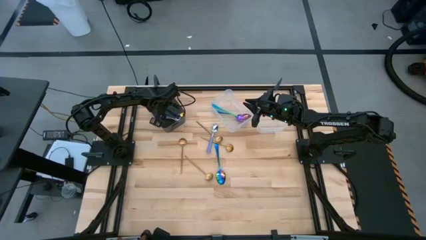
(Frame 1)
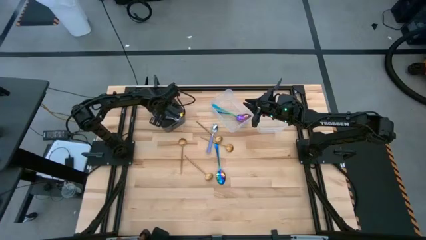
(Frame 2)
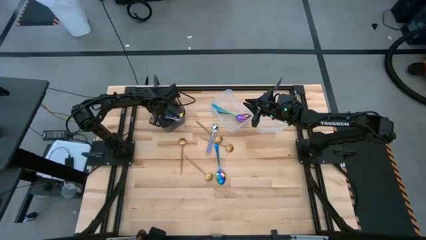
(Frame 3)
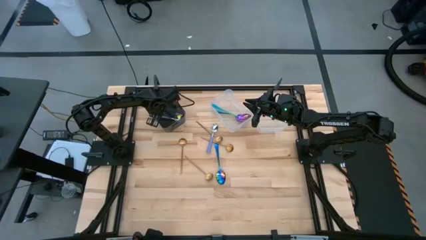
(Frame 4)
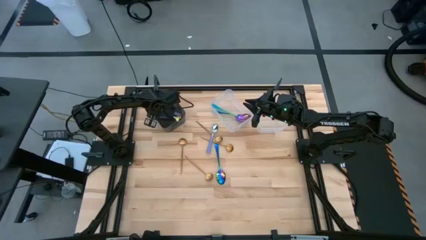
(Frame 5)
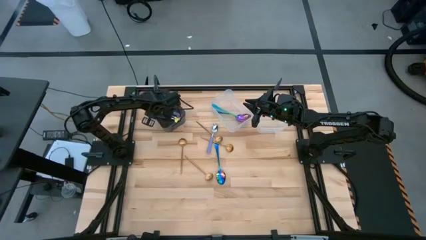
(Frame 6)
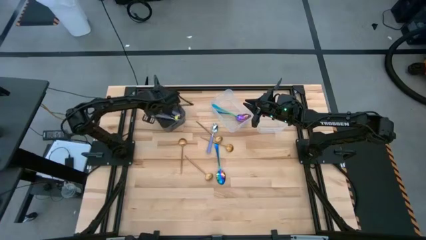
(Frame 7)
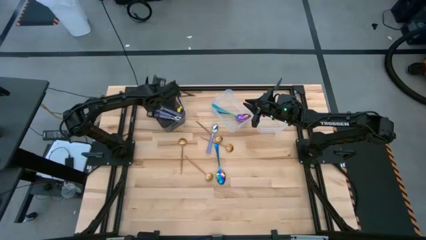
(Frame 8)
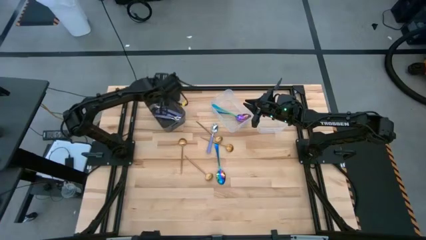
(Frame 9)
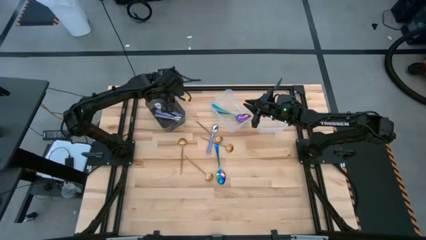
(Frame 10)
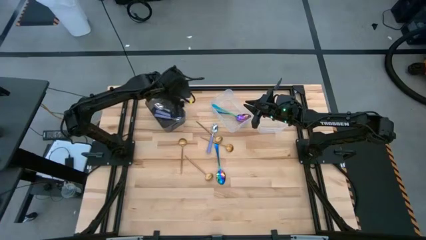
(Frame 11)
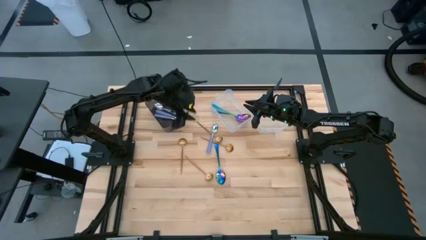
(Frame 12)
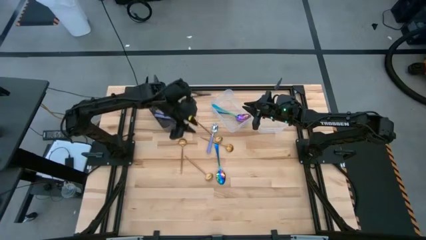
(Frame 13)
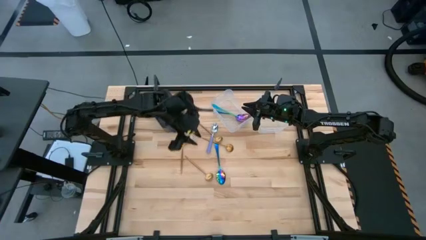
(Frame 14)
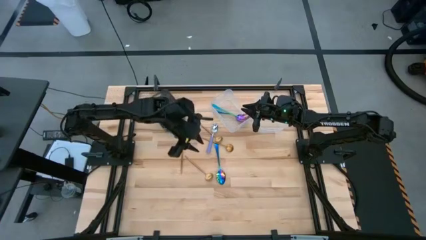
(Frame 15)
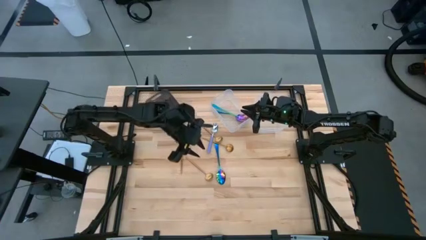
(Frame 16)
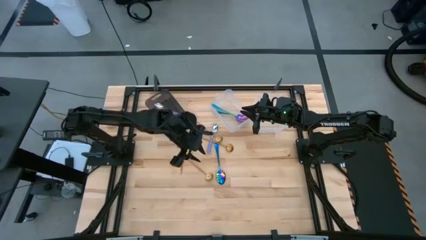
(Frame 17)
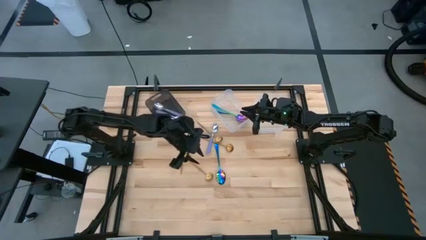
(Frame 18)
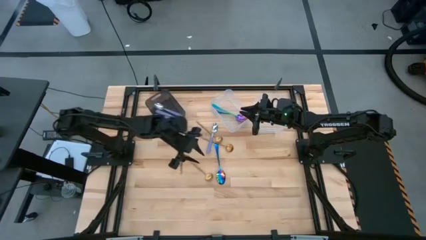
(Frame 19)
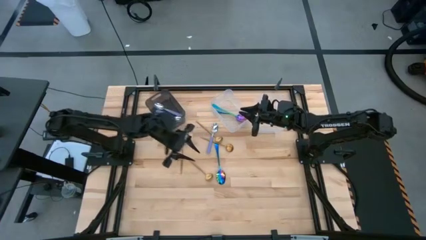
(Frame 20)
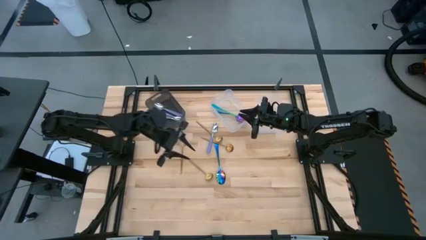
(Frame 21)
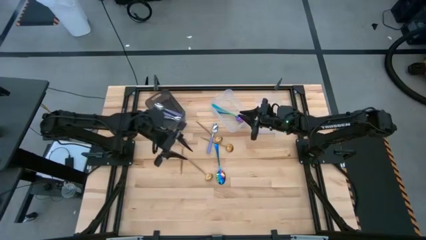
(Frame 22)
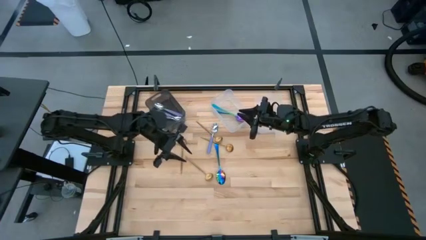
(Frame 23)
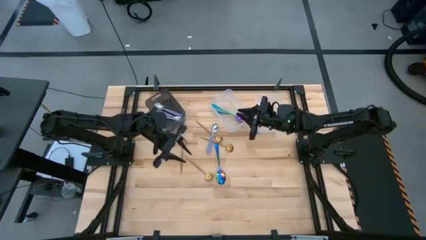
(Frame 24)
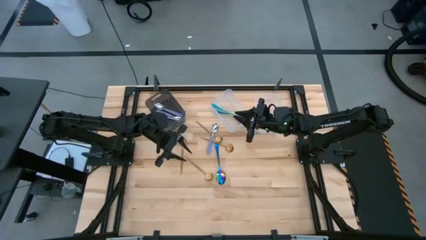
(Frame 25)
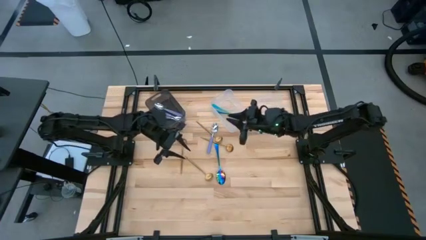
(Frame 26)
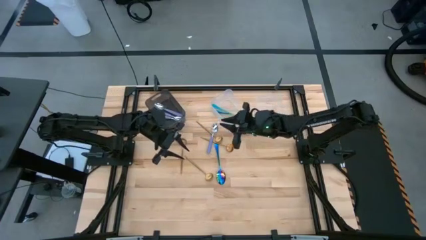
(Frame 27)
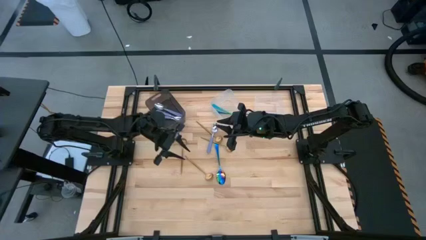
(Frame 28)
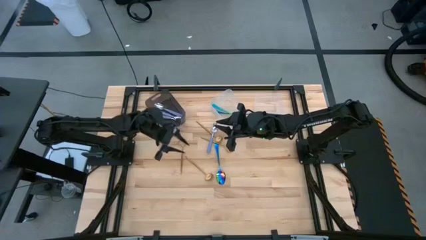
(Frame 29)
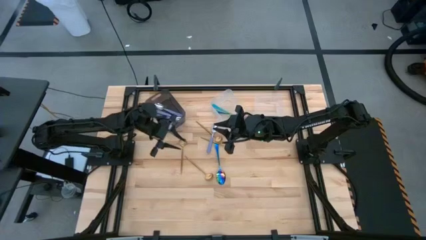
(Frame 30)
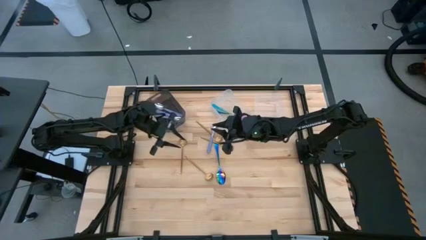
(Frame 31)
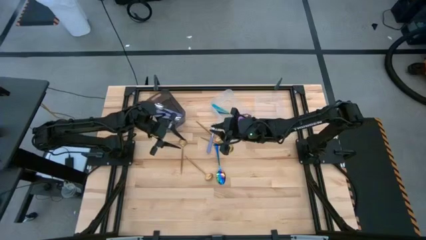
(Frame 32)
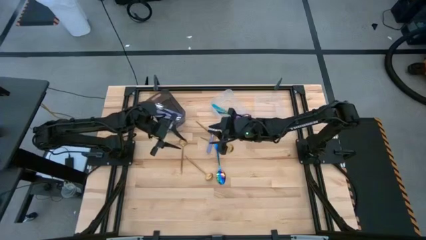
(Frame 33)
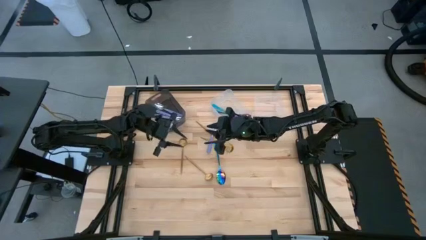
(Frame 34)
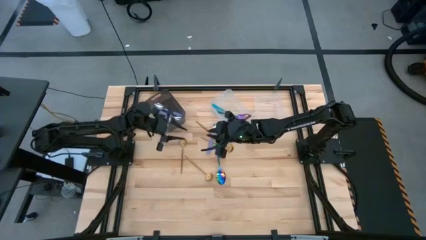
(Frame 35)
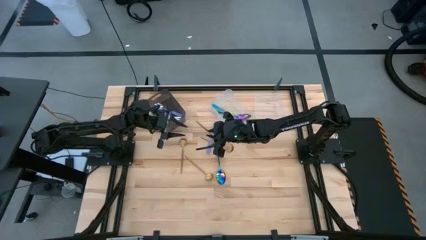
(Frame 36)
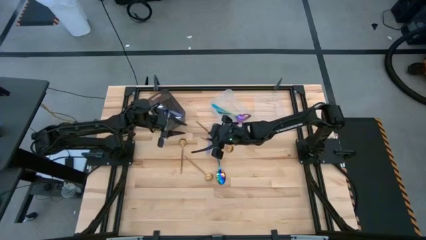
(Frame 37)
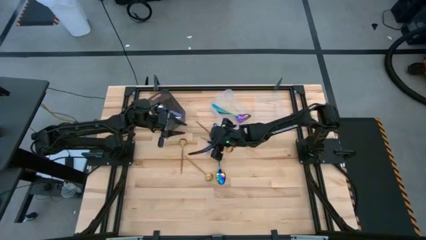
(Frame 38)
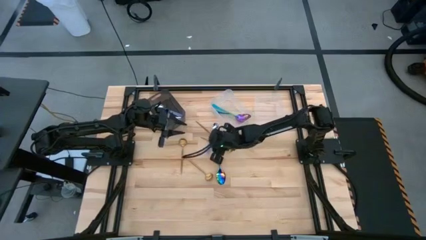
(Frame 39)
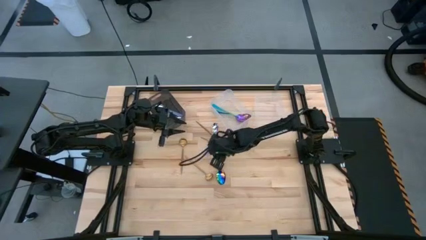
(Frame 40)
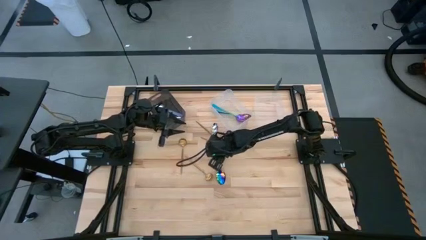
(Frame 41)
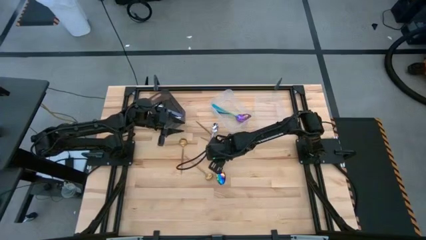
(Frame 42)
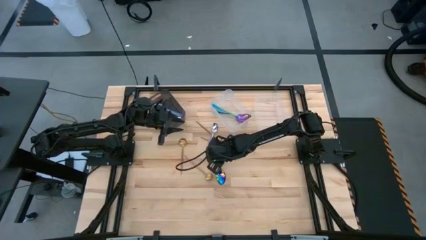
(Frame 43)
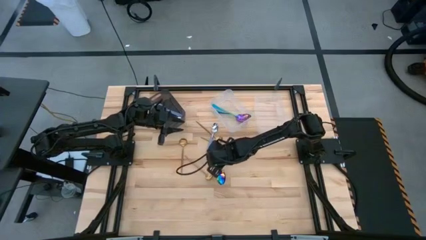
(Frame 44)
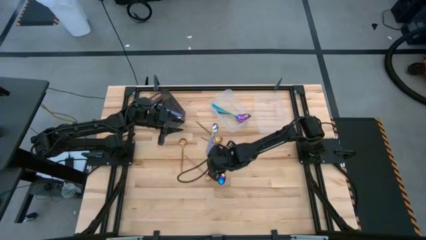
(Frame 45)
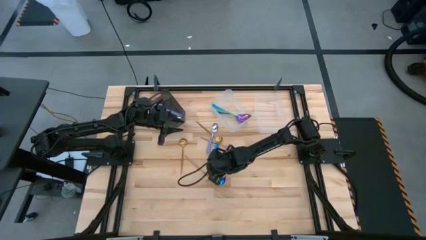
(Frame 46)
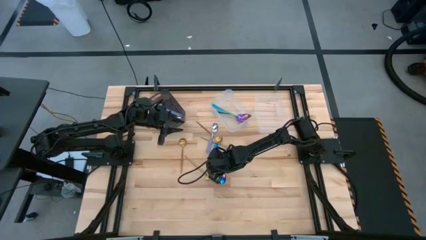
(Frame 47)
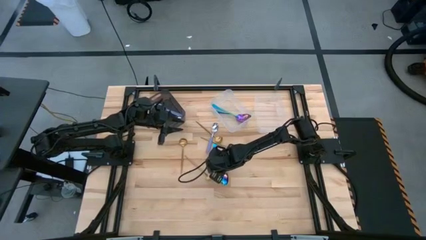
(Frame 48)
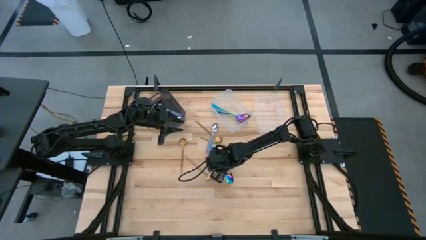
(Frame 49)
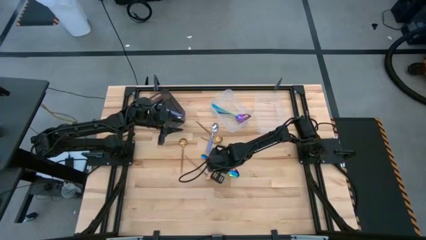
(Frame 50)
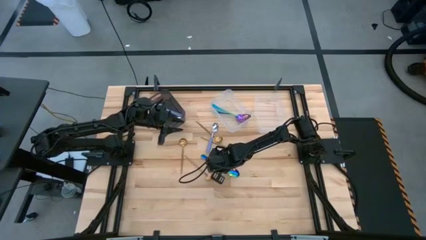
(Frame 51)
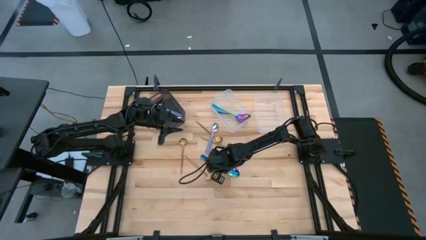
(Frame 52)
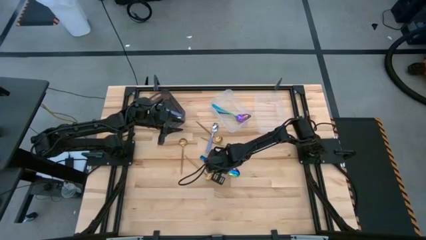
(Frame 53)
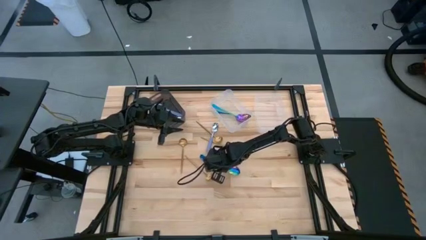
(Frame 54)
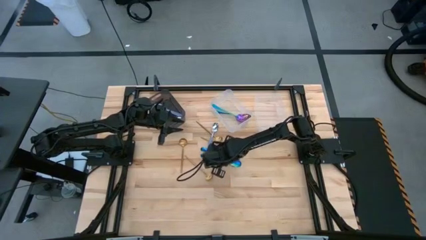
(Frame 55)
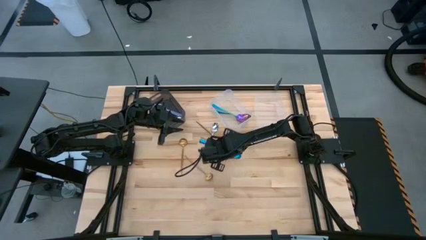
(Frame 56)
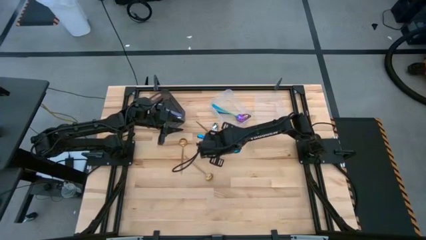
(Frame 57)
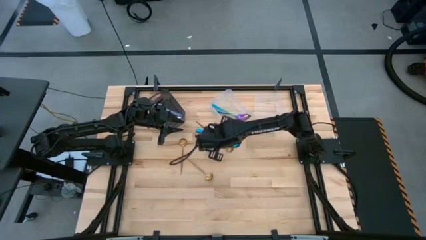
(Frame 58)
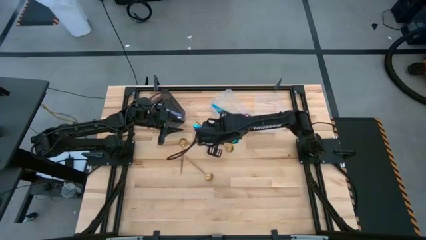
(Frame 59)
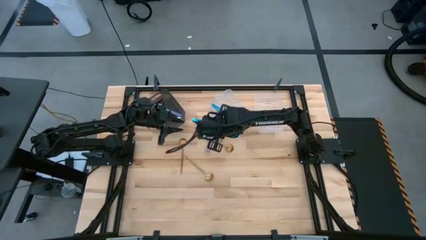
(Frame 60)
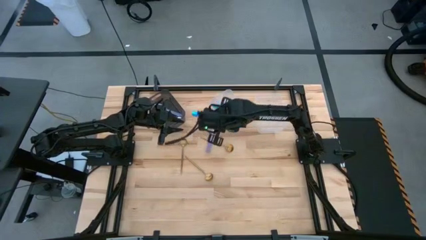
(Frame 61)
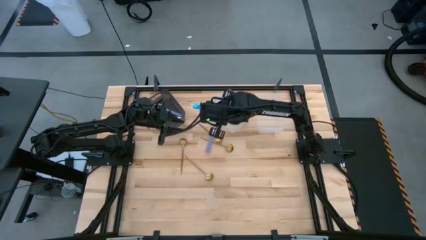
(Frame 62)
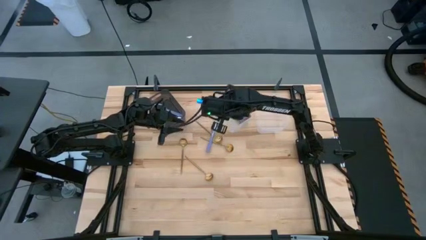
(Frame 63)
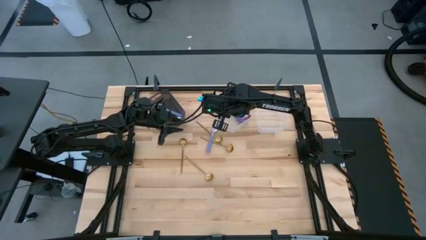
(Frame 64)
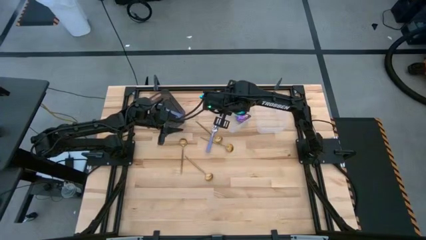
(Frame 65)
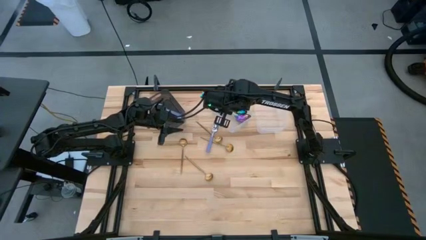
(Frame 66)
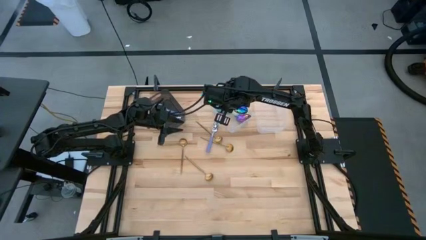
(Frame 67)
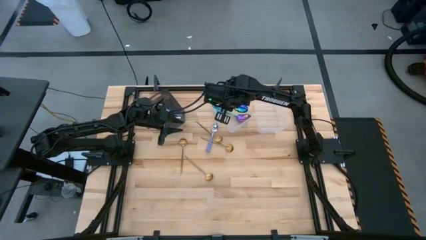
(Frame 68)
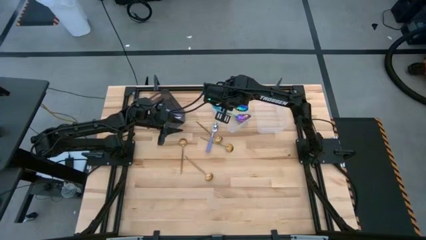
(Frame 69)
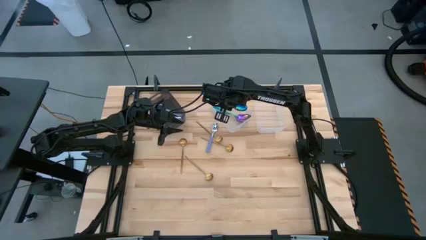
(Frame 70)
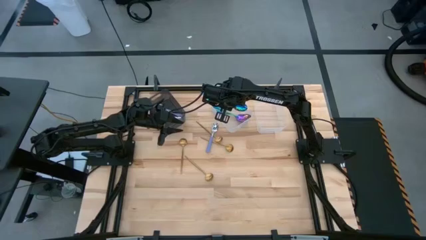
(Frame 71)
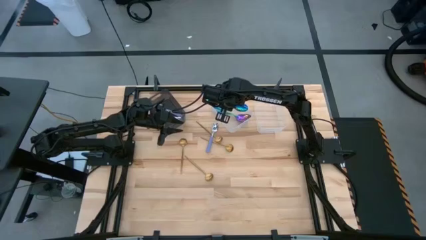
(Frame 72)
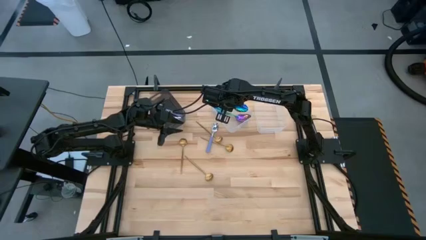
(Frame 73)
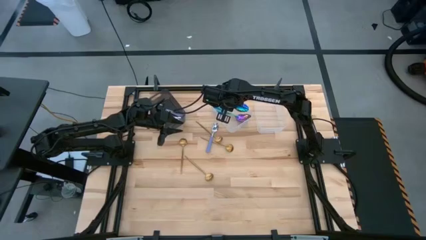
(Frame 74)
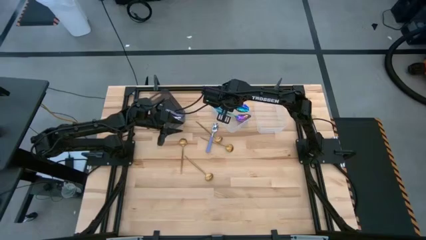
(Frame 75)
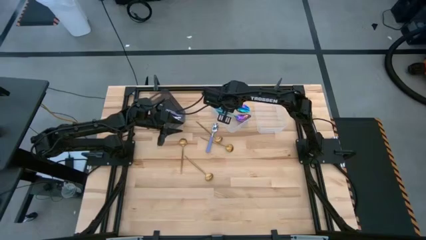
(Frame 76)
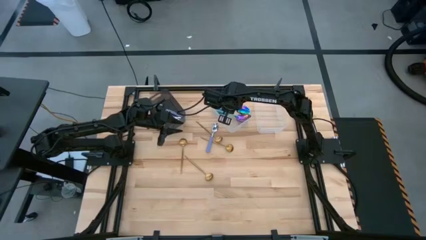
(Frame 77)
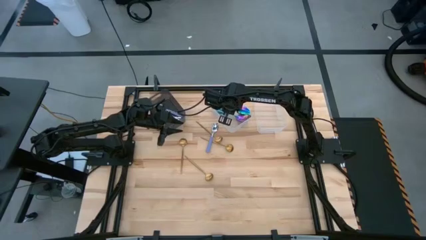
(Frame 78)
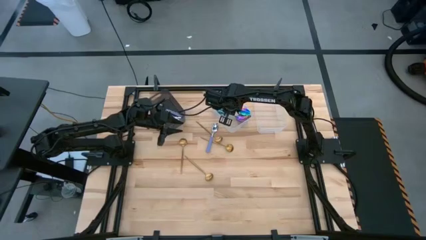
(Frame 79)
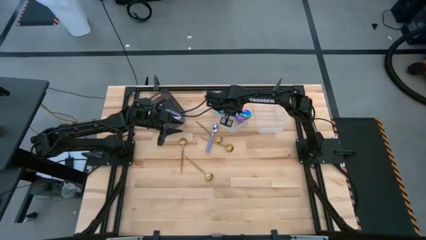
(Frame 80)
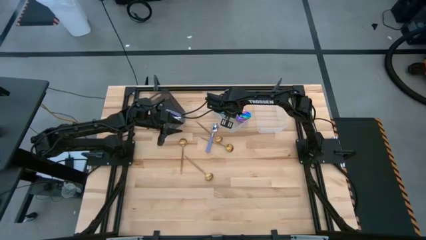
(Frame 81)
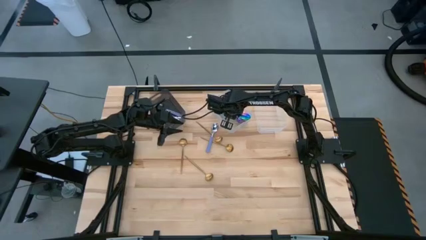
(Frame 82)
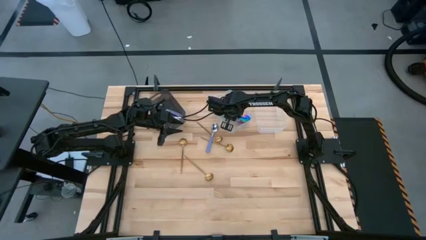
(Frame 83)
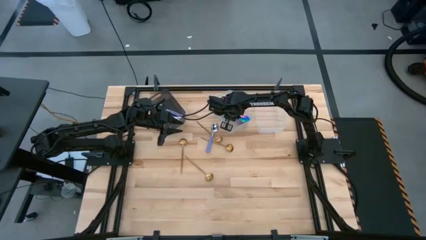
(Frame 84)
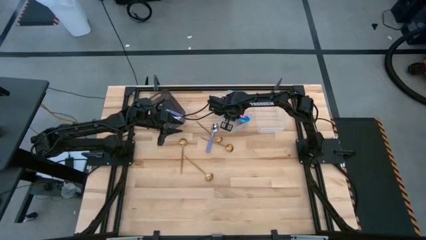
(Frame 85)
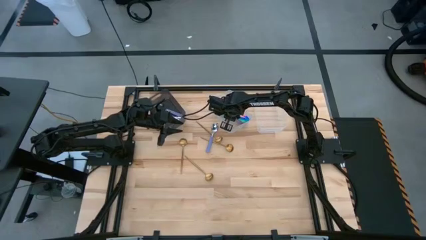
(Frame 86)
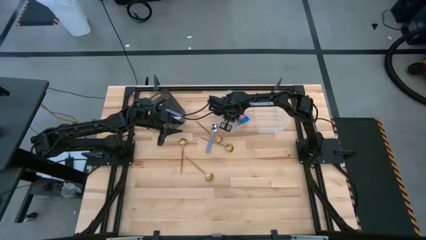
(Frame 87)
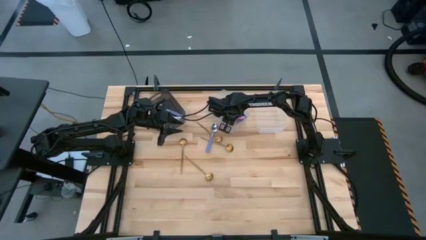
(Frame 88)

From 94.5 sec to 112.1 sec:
Task: Sort silverware by color (type)
Put the blue spoon into the left transparent bin
